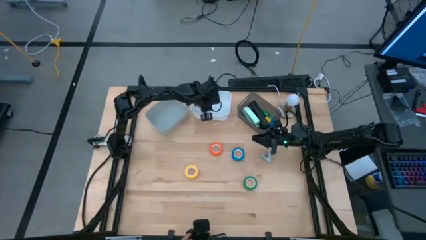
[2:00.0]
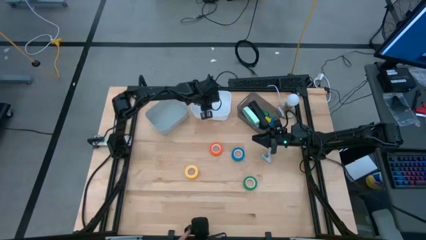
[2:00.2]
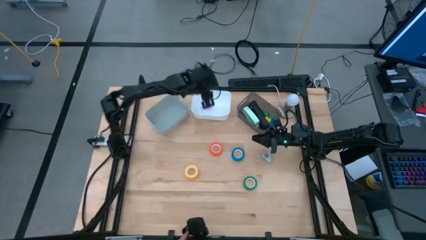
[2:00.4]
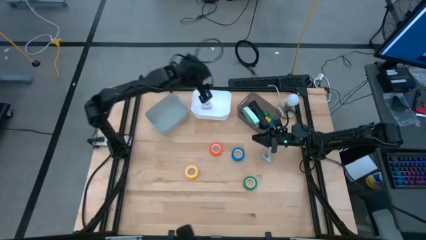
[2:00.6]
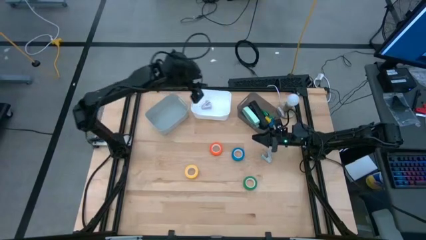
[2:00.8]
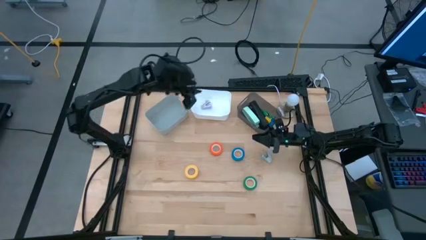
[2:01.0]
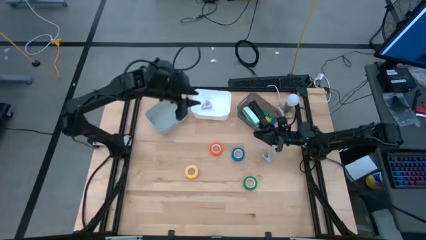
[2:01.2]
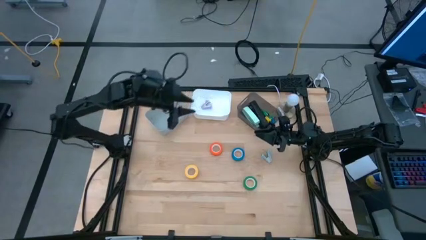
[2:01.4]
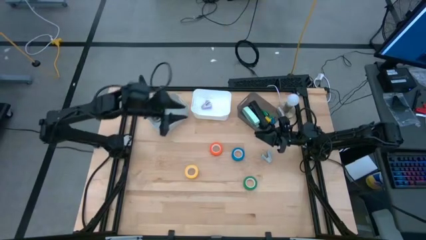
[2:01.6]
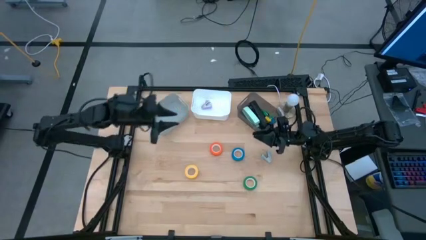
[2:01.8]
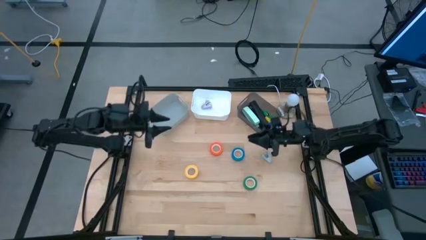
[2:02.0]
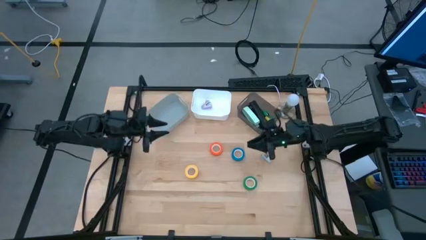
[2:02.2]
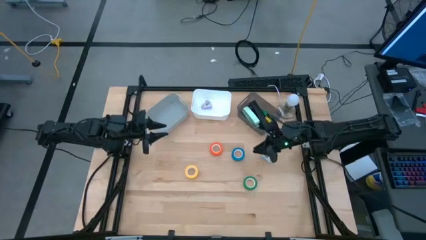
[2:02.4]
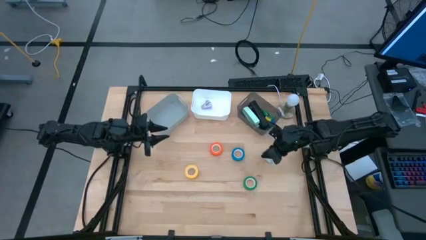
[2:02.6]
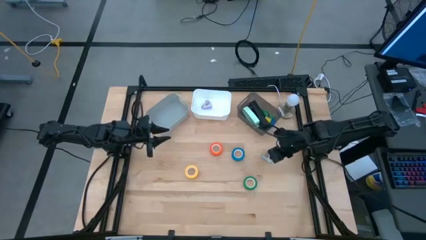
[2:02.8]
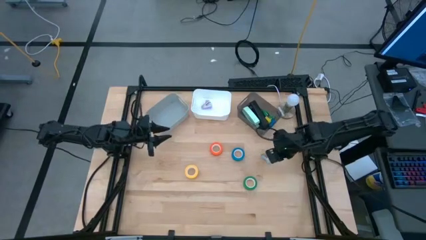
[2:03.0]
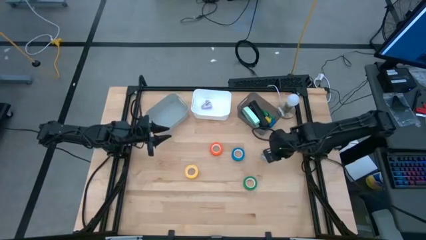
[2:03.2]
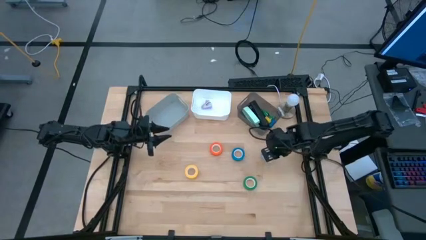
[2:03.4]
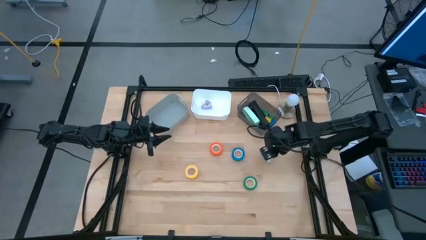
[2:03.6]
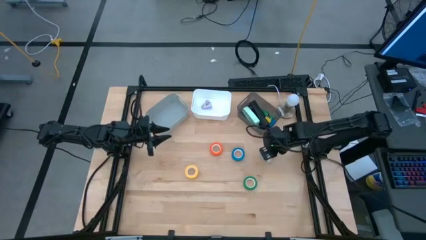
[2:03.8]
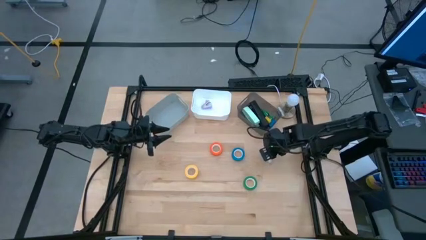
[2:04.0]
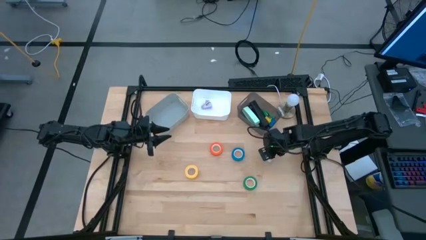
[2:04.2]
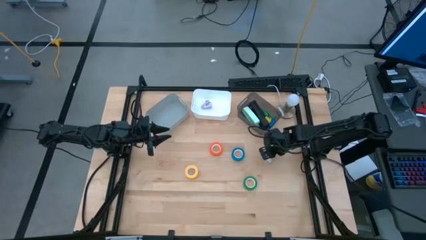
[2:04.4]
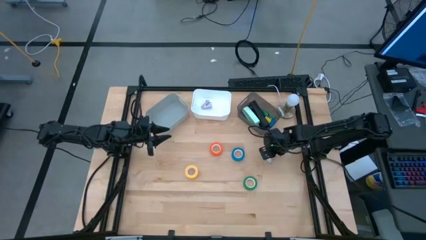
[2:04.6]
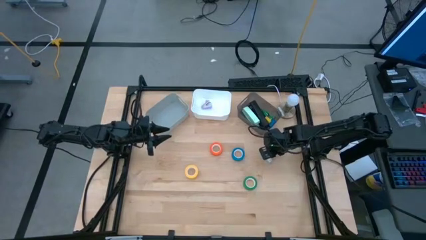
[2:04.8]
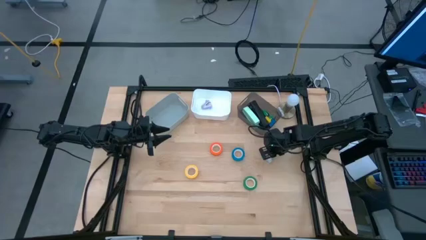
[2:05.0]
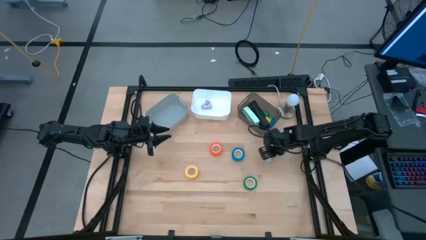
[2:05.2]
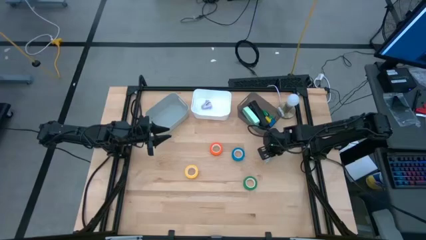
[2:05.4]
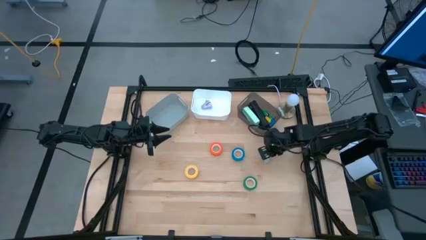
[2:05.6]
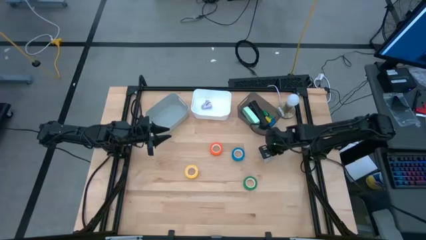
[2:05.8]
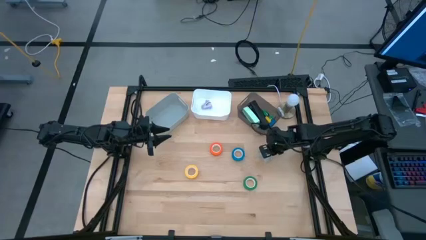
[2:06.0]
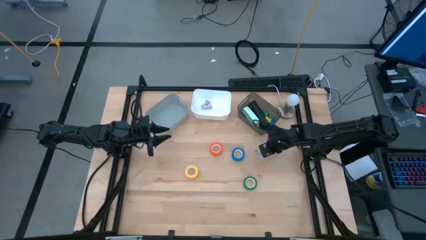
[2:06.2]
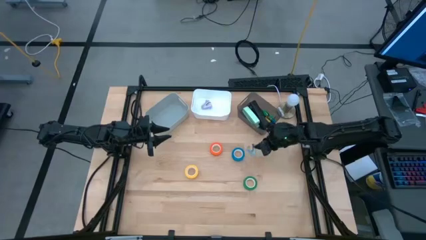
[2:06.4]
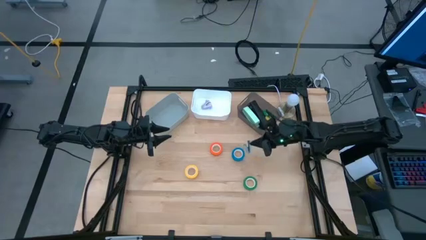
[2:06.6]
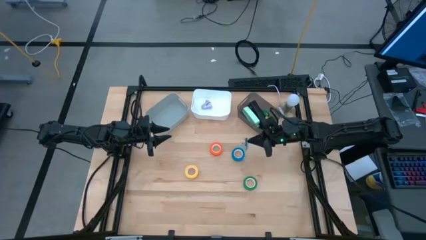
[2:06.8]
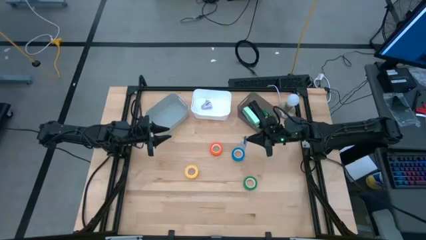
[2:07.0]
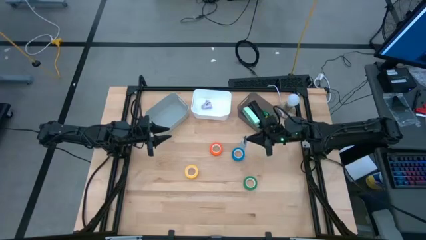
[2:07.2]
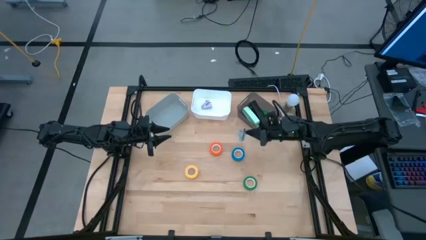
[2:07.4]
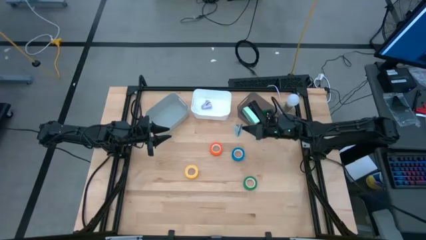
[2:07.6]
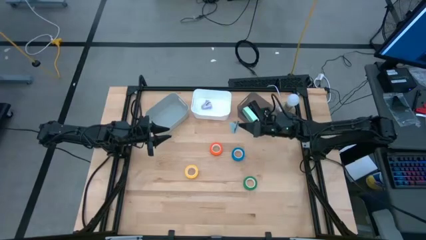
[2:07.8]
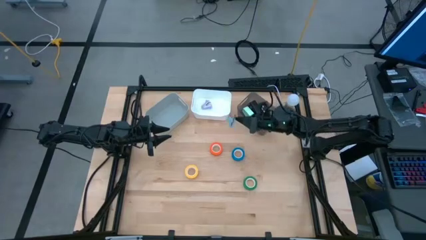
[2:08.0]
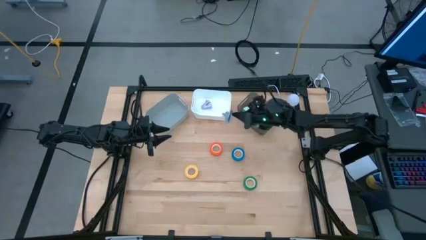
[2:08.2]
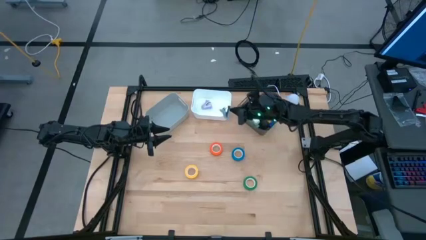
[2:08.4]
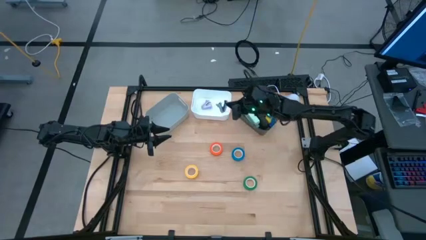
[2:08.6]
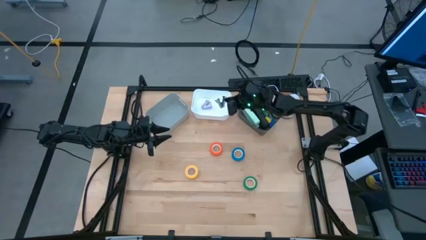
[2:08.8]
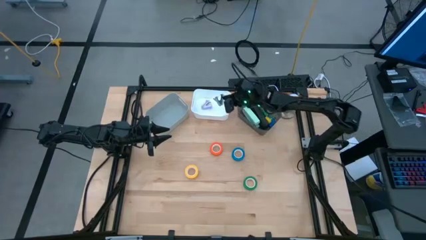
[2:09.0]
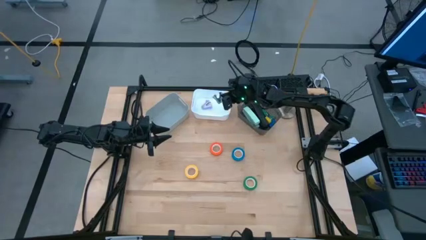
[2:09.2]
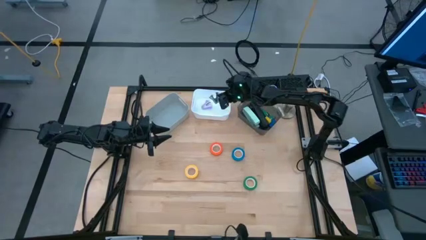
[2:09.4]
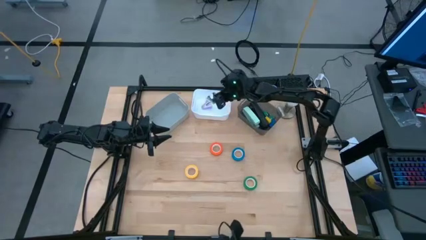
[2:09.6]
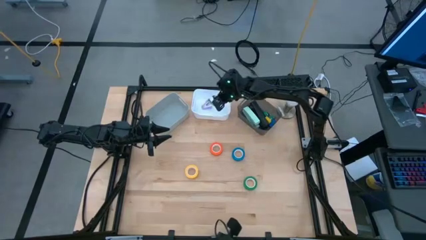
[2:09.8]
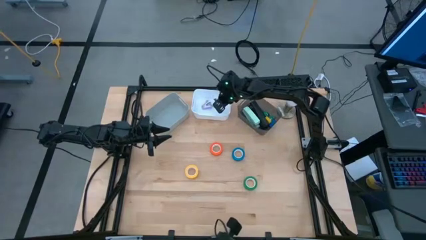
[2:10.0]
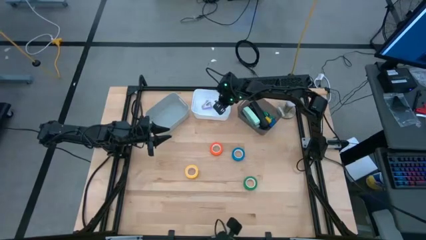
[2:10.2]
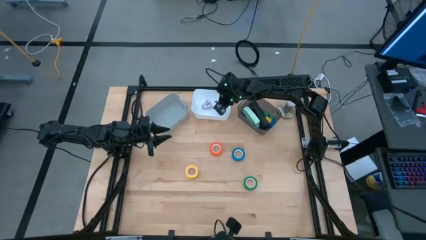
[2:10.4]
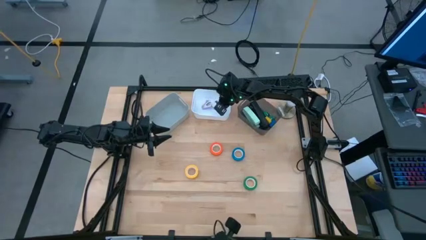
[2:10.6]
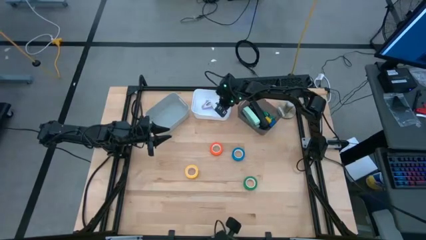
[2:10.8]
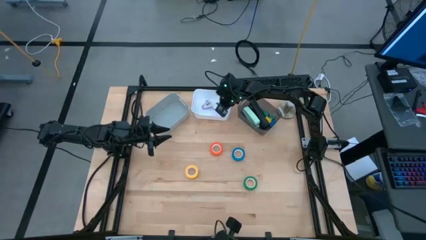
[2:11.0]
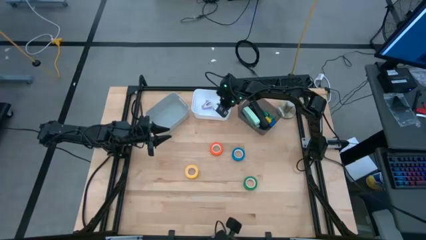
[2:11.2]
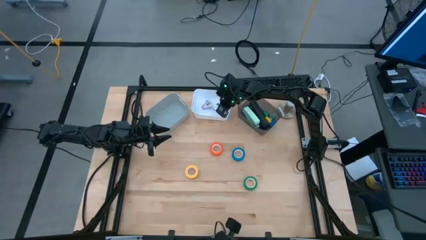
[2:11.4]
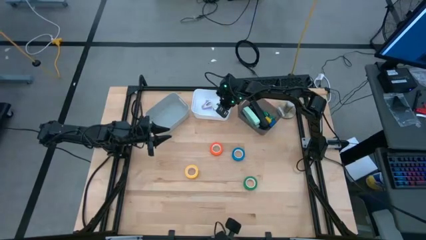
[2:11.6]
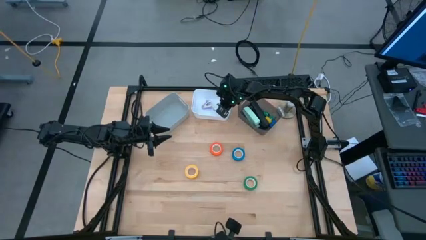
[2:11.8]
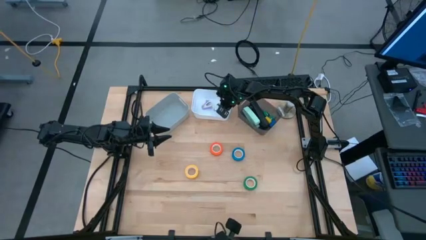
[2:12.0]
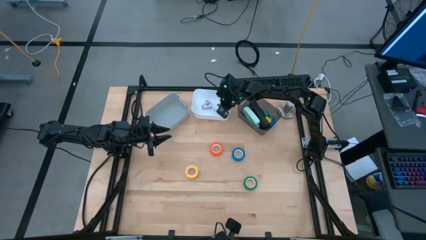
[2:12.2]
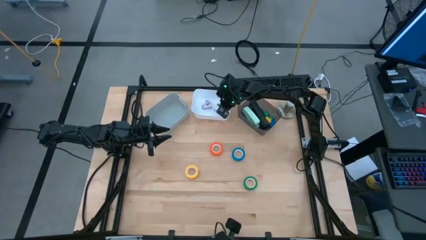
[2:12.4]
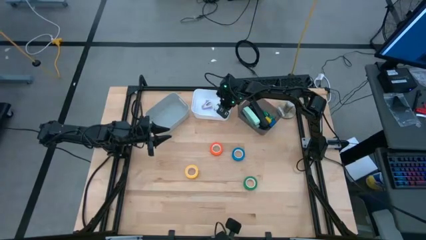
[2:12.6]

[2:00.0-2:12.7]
Task: Pick and place Stapler, Stapler remover, tape
Put the light blue staple remover into the white bin

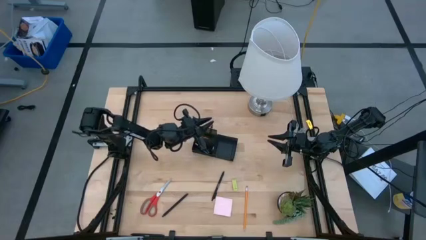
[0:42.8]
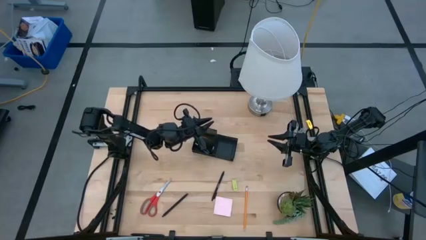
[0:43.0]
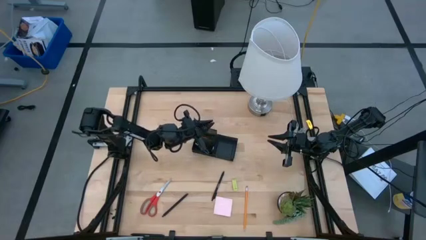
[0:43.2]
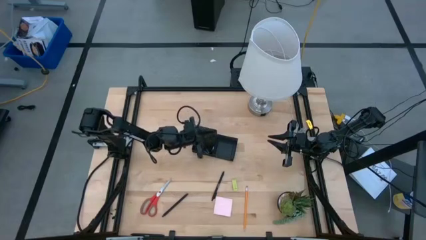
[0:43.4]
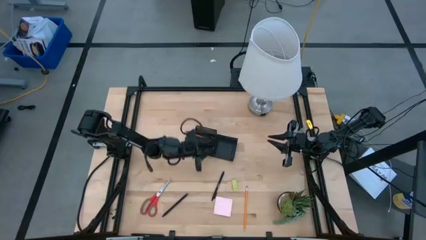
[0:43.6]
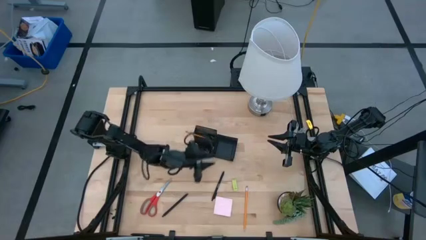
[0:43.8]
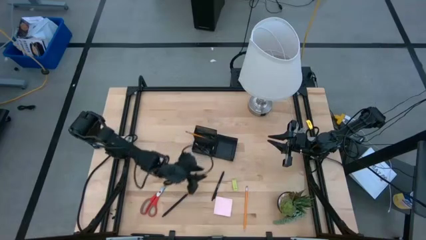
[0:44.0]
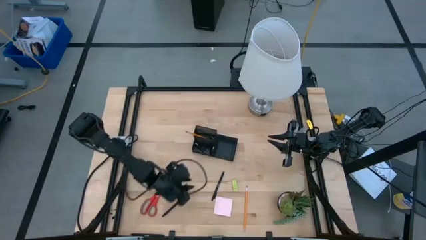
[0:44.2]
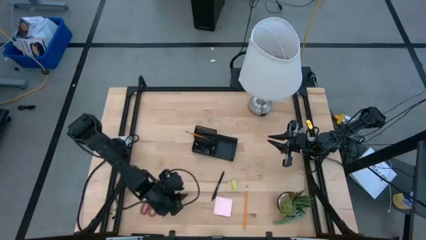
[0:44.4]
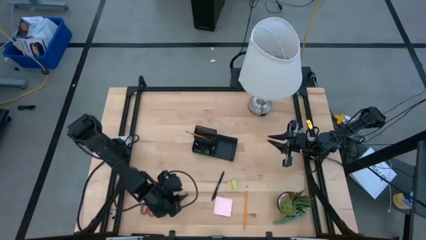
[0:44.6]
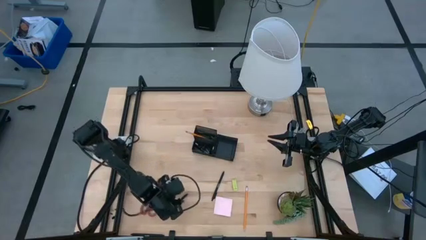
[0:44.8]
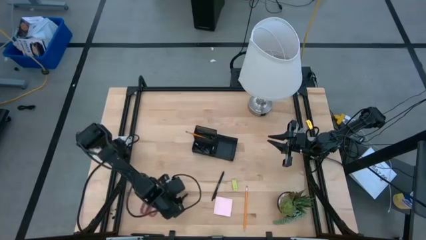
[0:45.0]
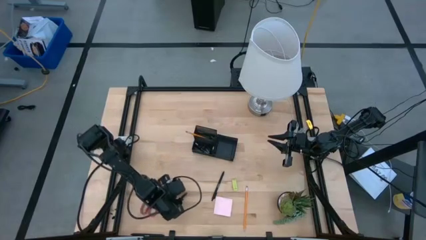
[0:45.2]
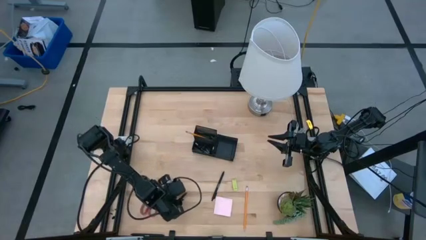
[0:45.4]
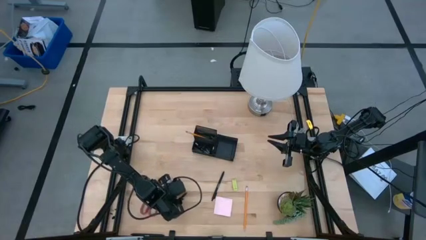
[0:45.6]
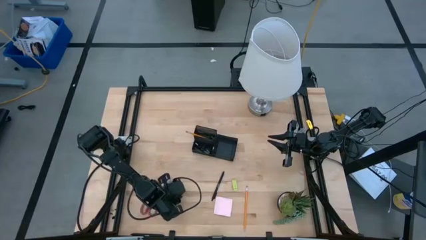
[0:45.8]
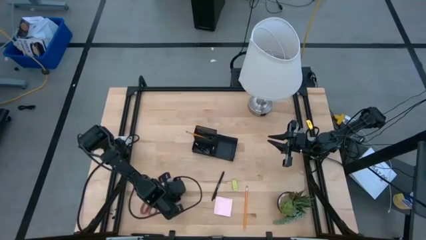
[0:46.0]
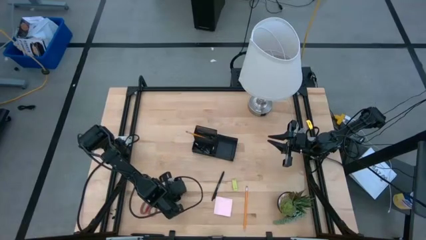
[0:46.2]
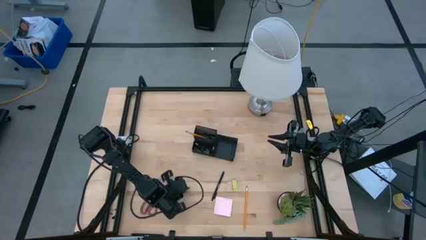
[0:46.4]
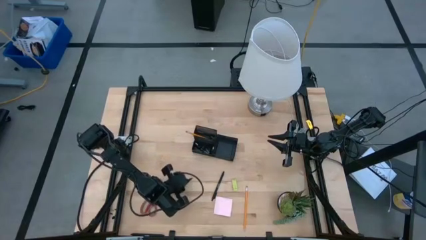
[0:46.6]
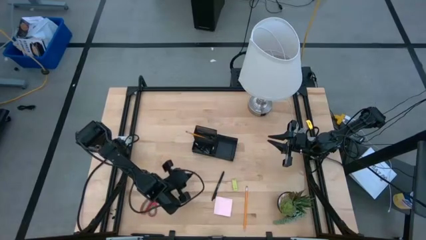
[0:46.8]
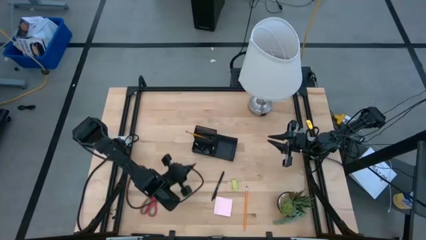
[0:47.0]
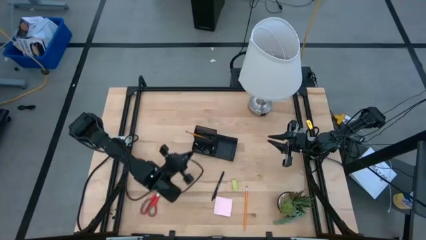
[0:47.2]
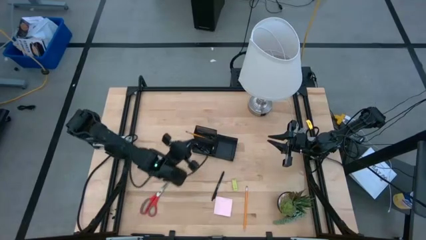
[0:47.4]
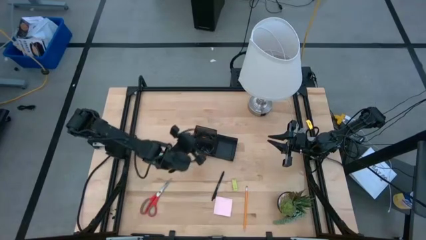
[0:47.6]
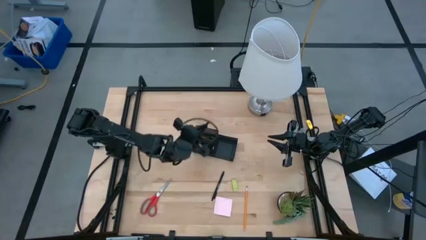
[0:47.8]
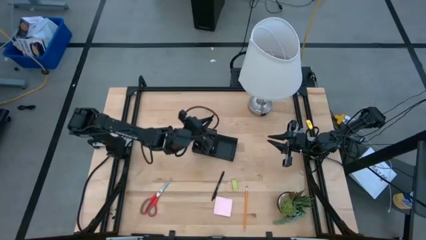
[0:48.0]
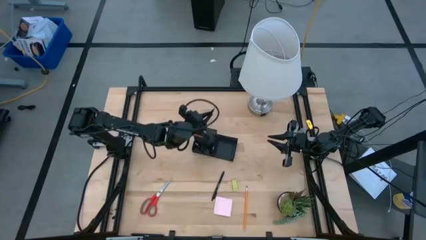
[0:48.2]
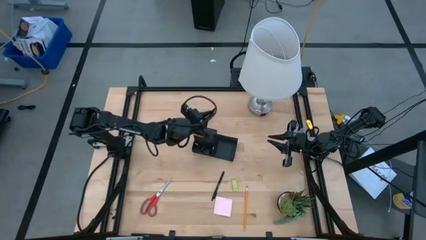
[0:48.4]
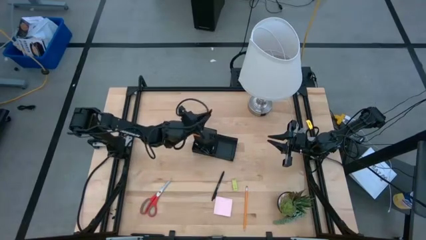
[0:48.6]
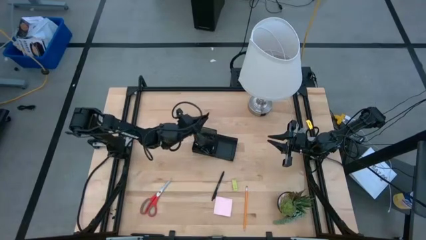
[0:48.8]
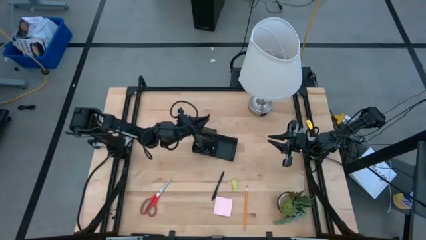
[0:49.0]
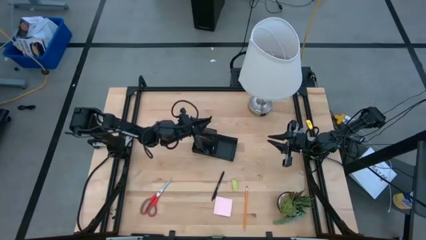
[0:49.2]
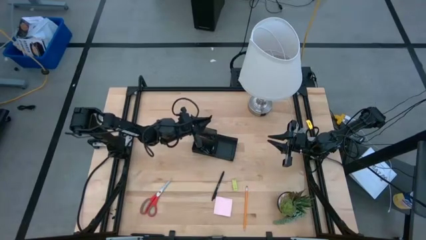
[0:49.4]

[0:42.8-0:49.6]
Task: Pick and place office supplies into organizer
Put the black pen into the black desk organizer
